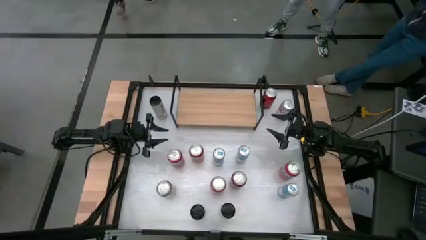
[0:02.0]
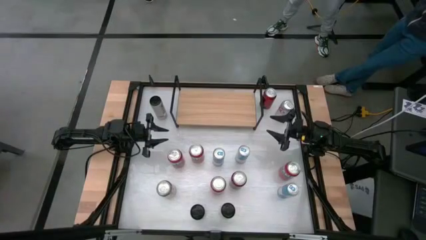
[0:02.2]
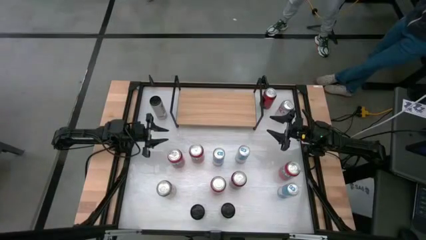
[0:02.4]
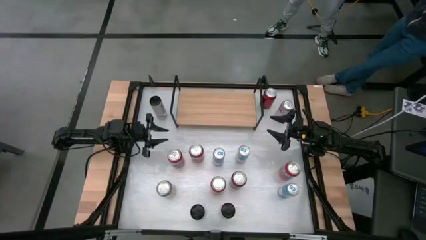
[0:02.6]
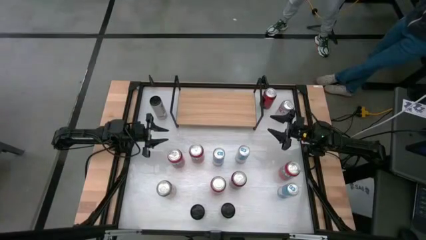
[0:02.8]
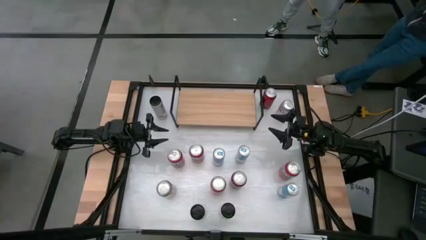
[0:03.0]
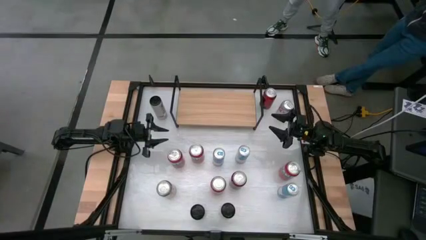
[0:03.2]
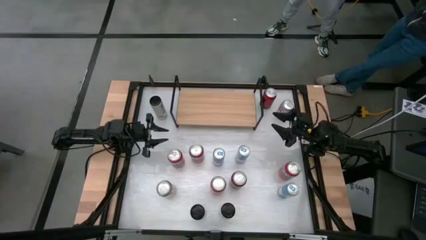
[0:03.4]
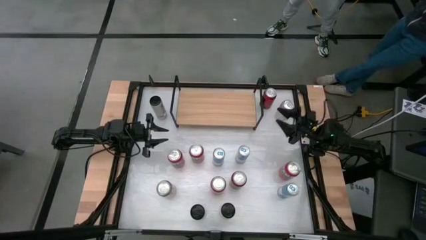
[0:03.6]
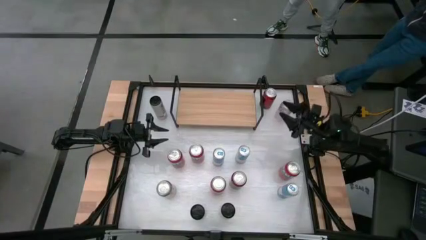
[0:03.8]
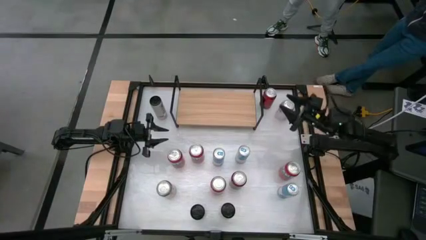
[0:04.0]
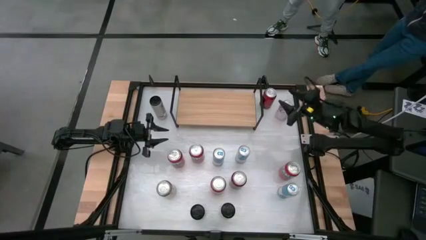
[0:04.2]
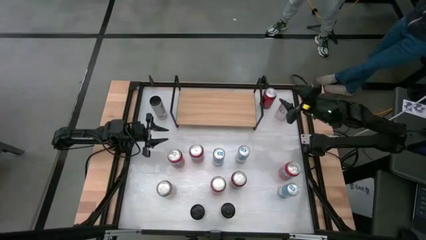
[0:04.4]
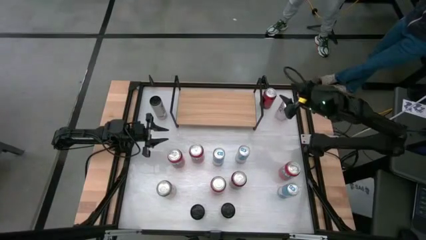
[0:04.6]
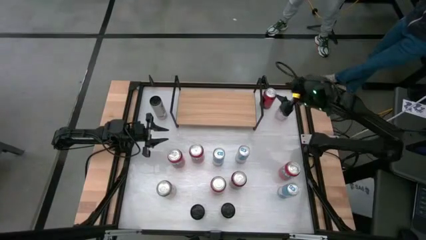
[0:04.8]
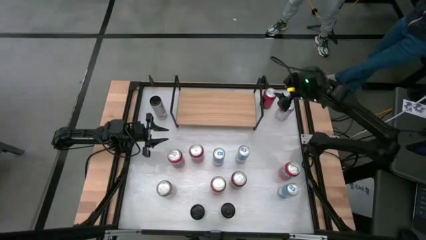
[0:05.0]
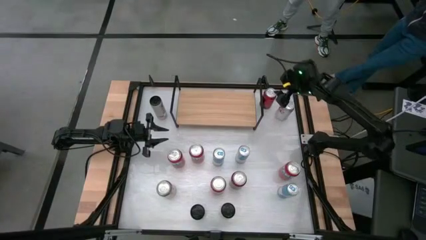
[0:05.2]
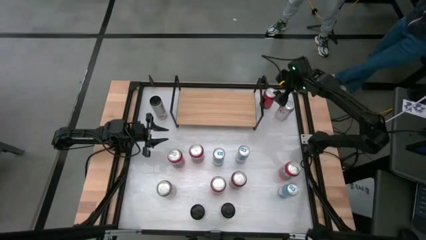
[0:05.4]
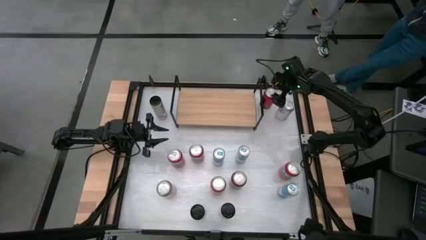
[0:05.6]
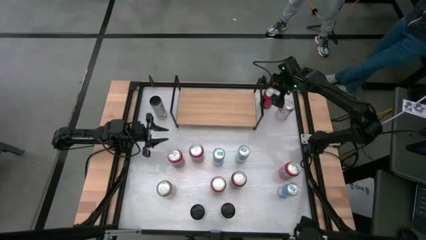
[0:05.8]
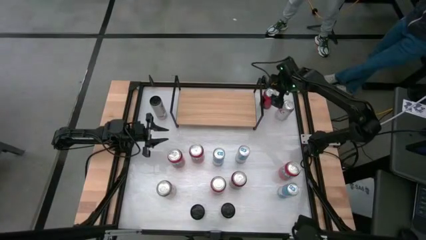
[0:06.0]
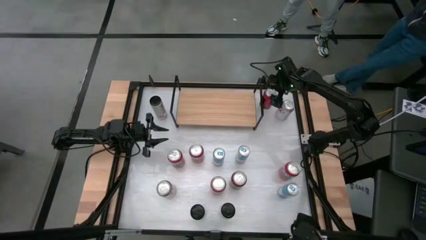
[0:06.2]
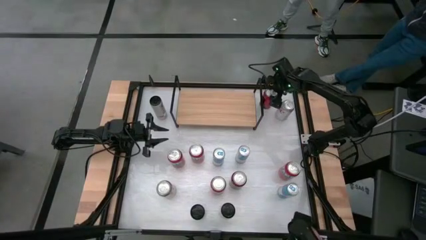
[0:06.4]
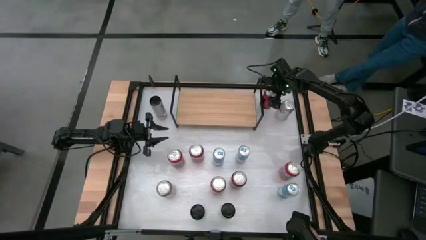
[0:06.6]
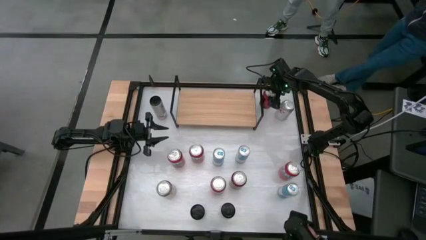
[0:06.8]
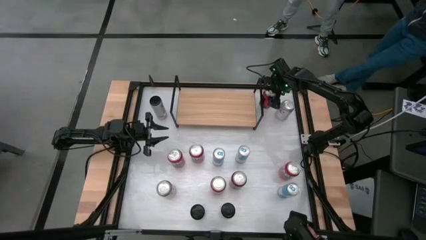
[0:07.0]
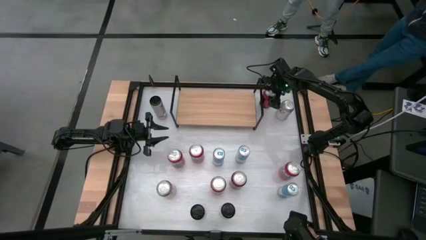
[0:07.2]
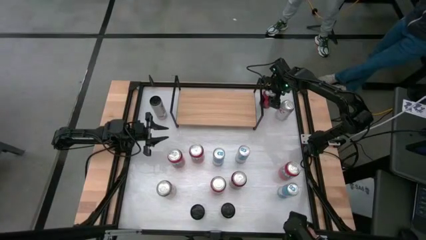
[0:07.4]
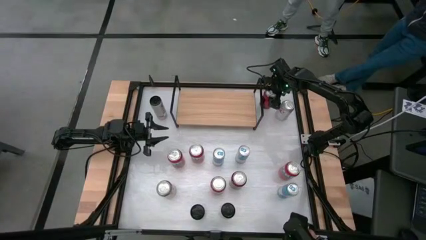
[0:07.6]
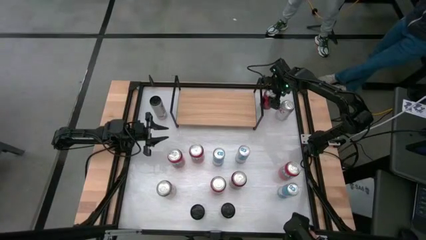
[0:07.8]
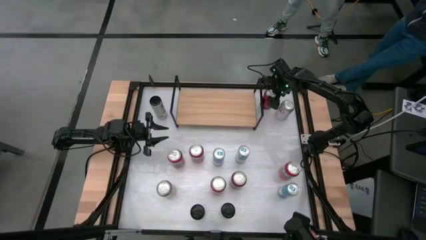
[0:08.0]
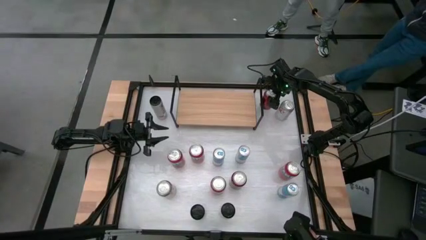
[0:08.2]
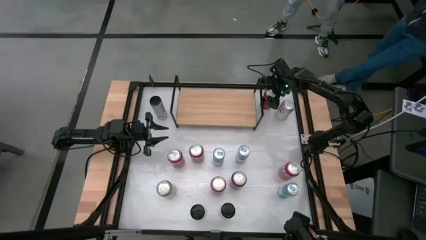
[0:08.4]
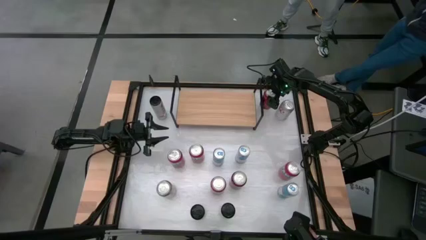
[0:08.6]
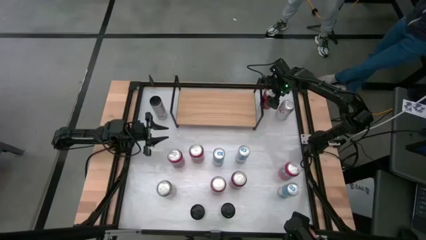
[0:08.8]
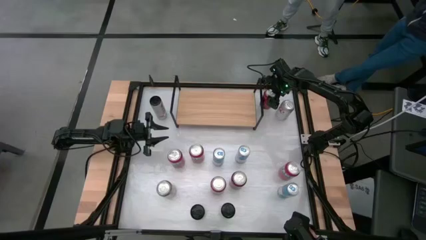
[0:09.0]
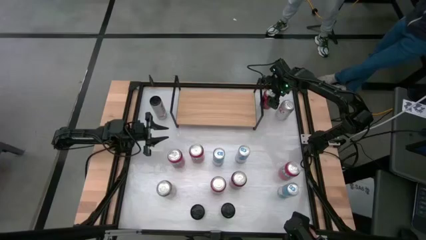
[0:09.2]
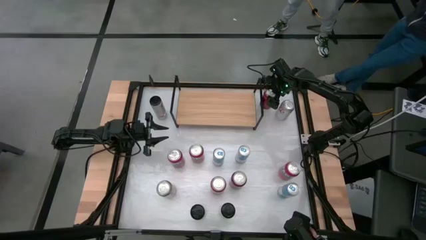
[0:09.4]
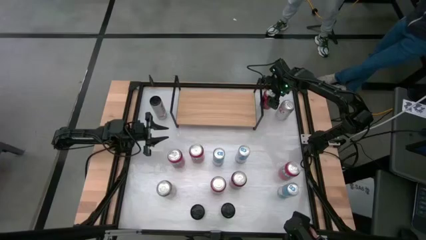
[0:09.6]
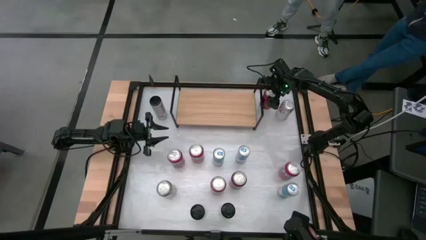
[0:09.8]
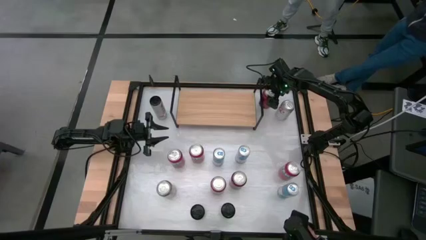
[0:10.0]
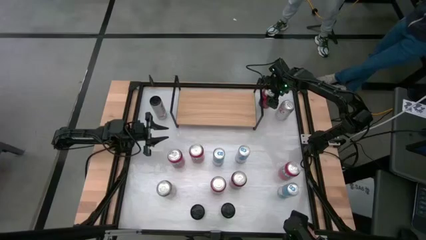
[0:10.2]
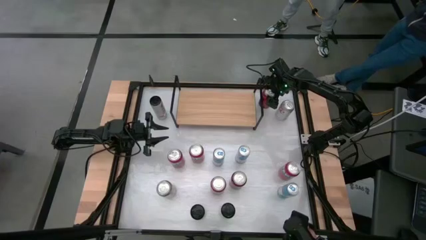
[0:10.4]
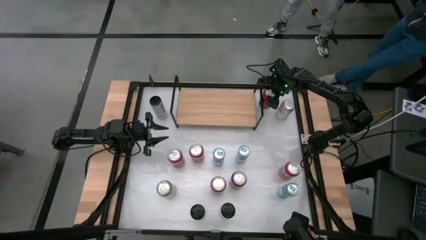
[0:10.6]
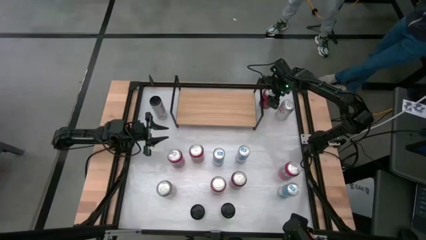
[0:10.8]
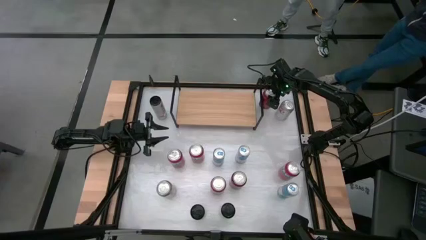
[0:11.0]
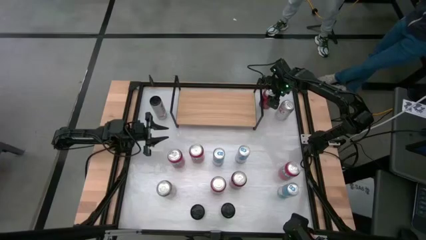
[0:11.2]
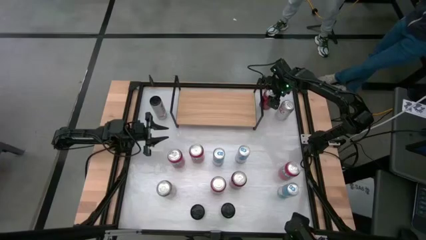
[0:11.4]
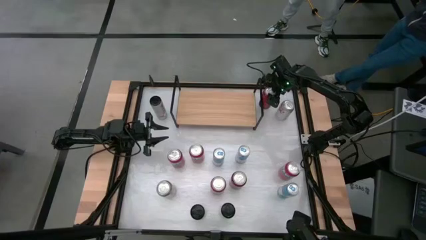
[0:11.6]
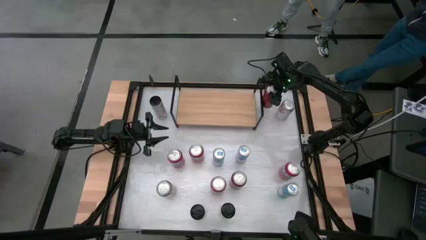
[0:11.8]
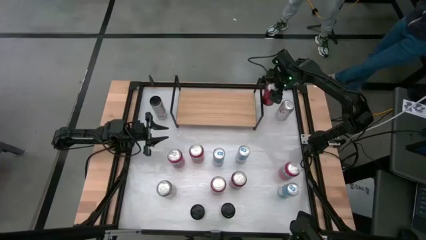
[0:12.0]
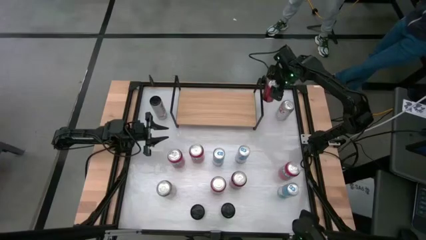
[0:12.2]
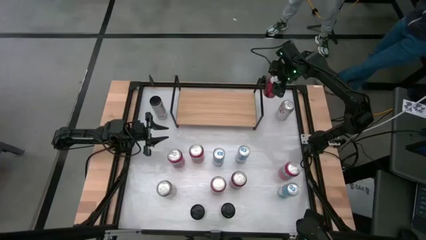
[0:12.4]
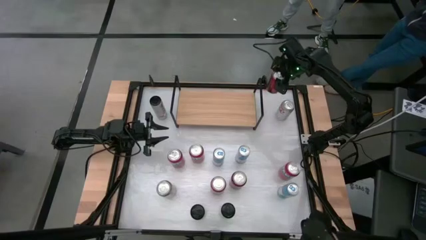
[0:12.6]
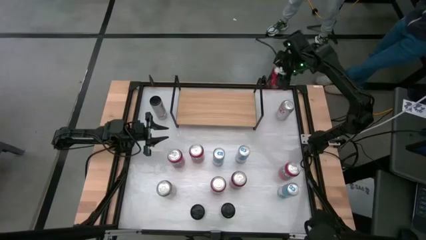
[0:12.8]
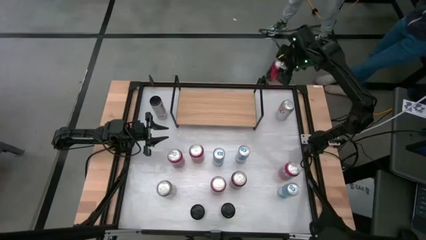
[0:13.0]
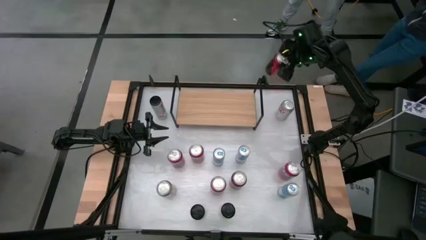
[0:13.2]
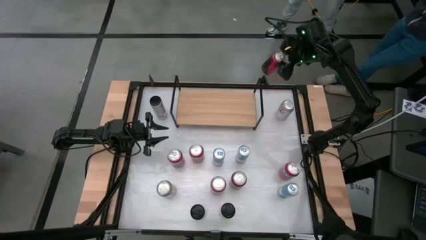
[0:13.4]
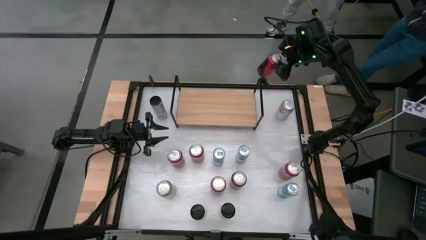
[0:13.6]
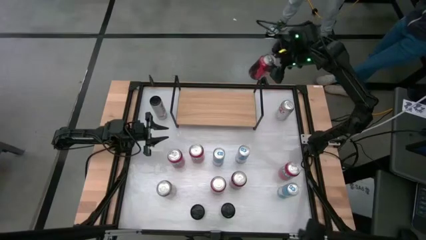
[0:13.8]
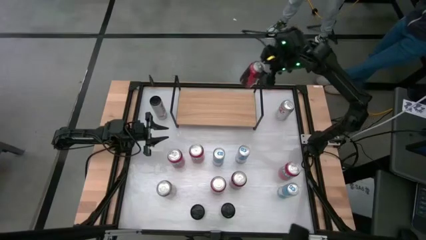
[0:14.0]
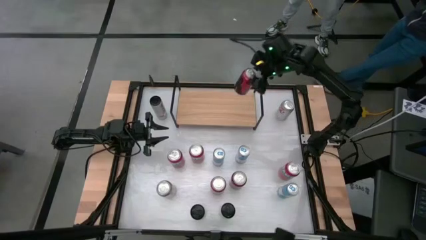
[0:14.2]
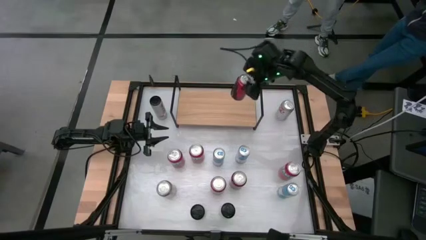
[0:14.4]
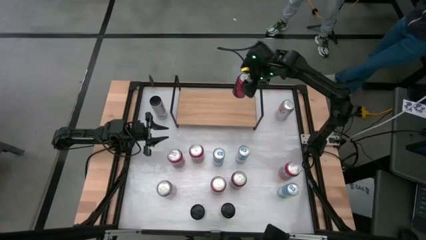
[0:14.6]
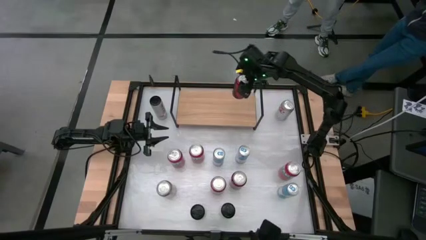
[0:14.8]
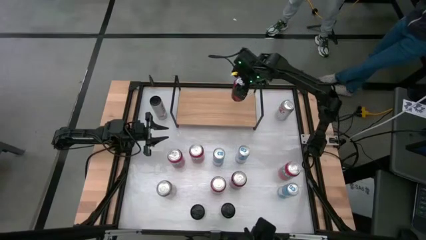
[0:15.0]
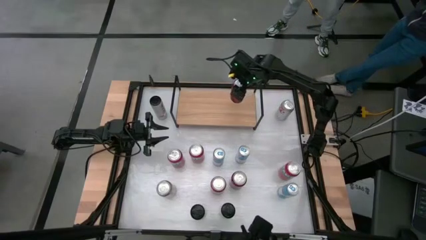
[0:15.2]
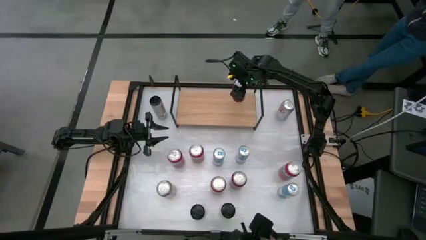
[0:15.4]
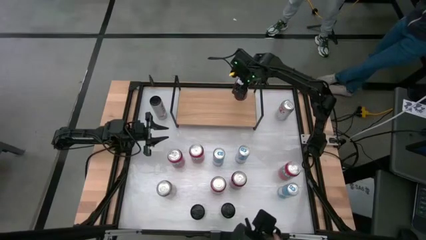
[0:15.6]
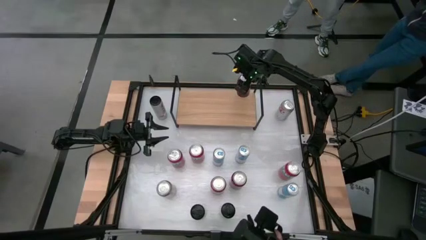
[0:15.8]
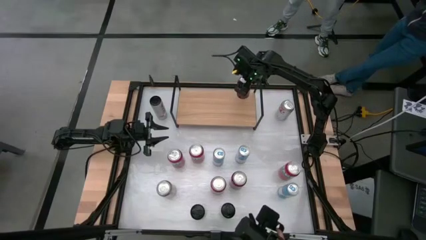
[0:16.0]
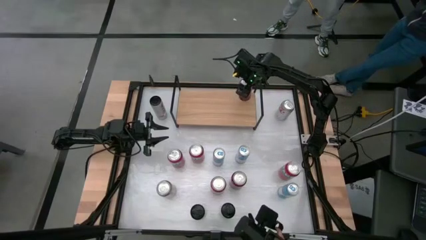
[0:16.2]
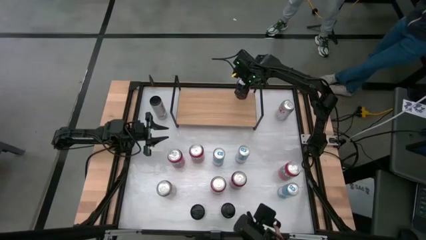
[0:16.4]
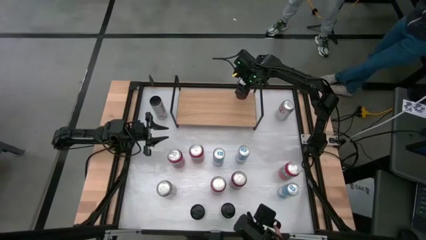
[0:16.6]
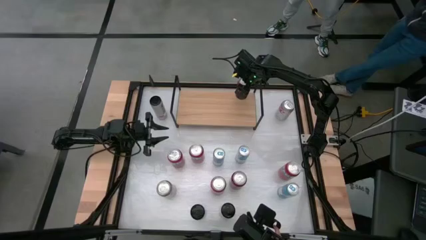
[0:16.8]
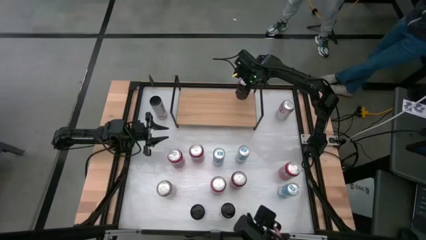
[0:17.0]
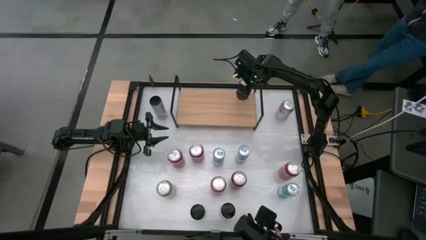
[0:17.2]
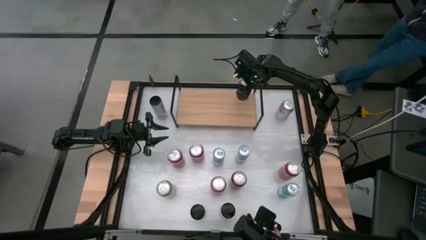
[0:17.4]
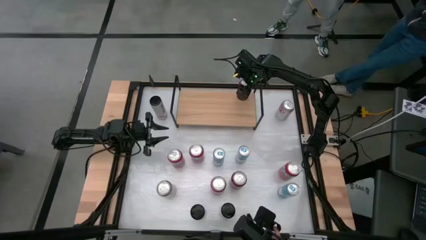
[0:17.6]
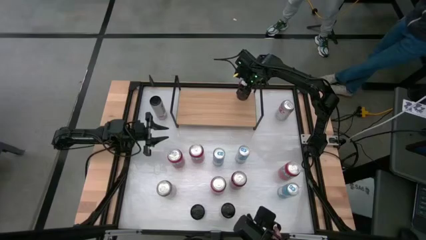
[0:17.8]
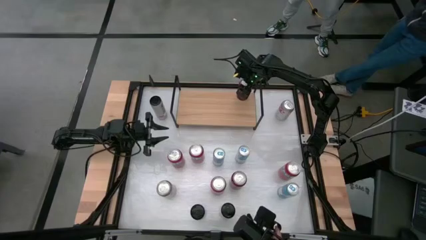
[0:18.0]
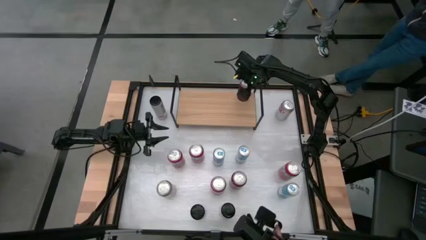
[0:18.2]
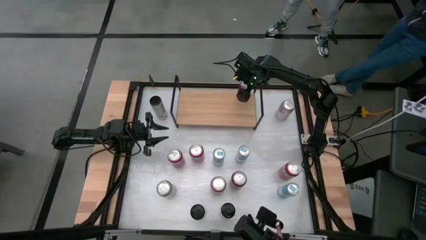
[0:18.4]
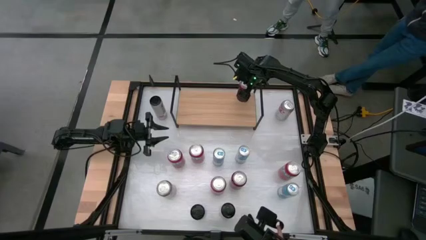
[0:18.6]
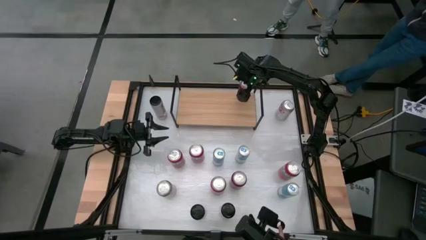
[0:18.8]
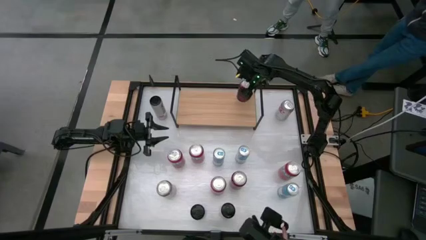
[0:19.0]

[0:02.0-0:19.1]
Task: Place canned beverage on shelf
Put the red and black soda can on the shelf
